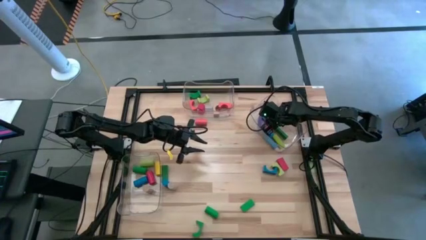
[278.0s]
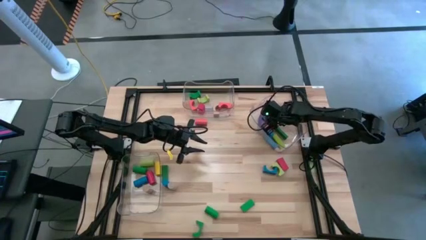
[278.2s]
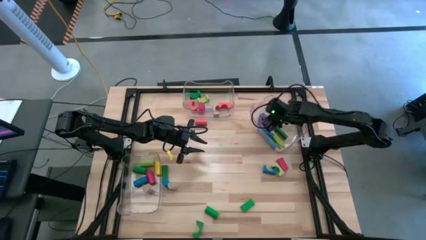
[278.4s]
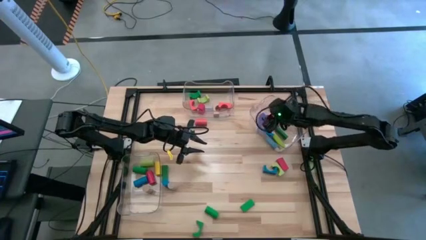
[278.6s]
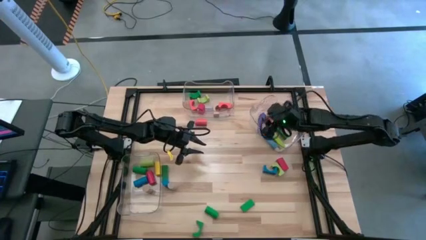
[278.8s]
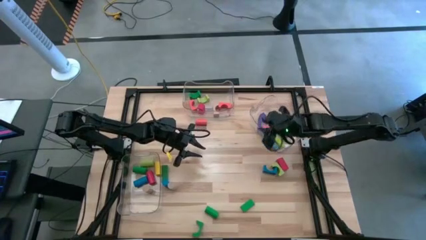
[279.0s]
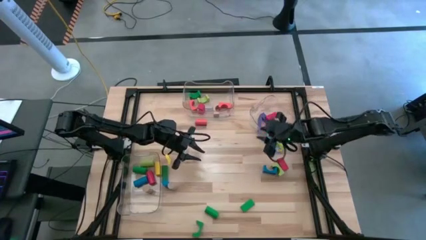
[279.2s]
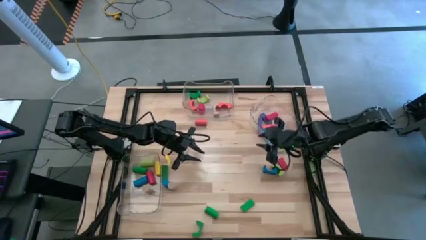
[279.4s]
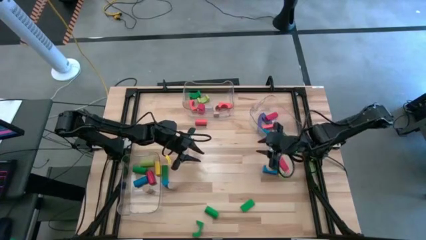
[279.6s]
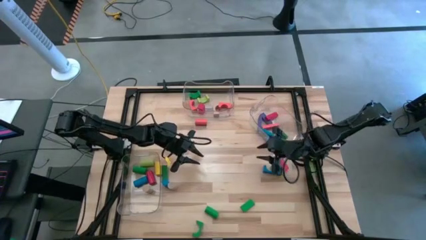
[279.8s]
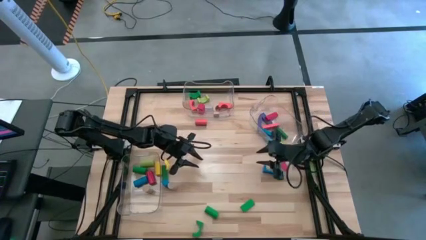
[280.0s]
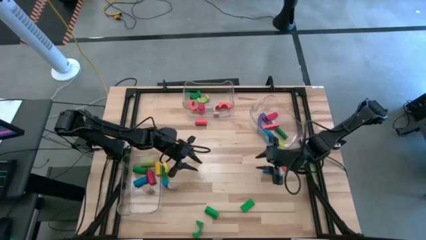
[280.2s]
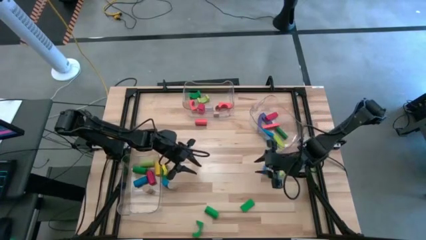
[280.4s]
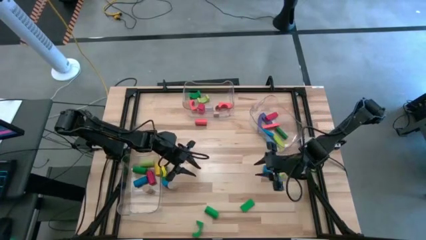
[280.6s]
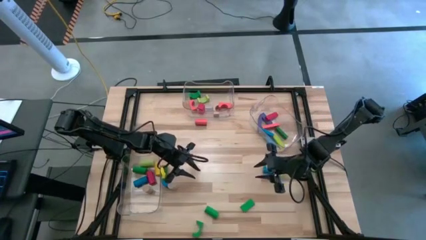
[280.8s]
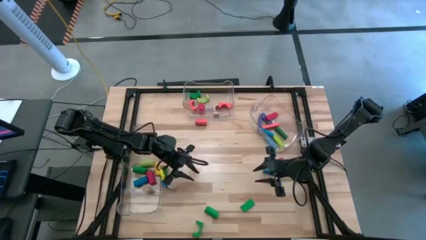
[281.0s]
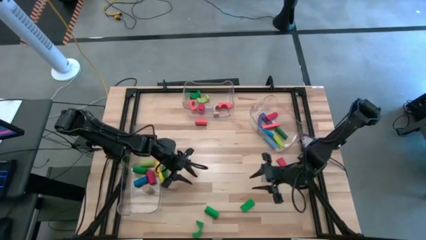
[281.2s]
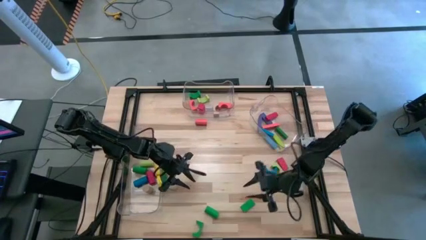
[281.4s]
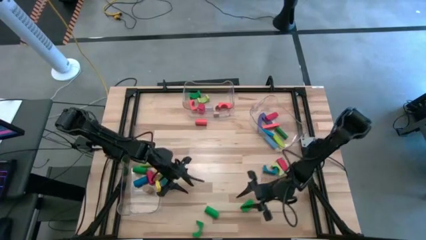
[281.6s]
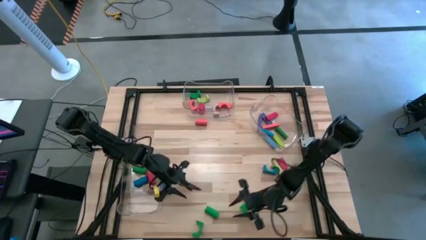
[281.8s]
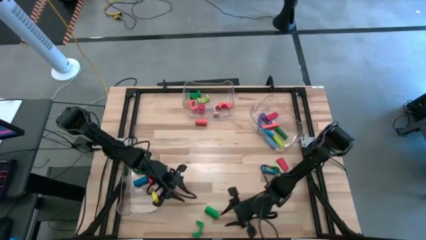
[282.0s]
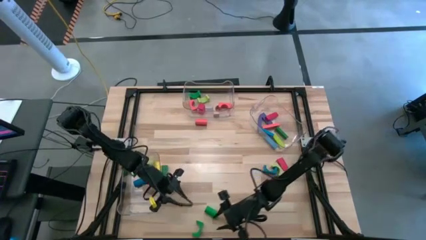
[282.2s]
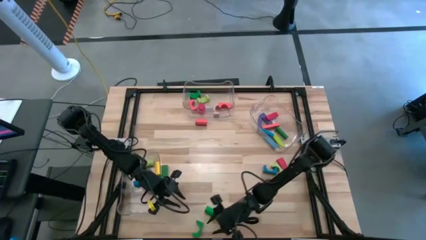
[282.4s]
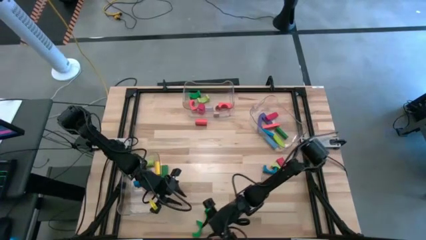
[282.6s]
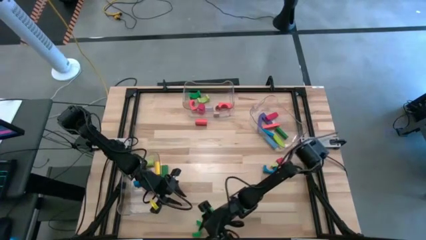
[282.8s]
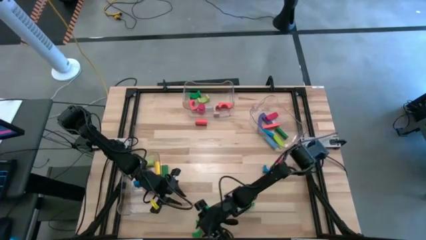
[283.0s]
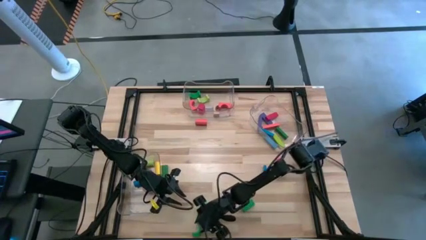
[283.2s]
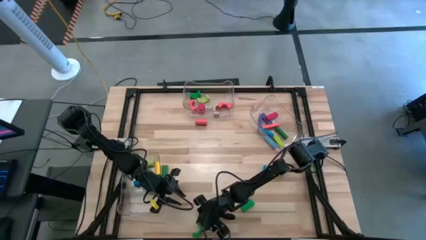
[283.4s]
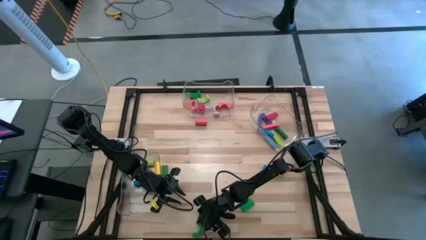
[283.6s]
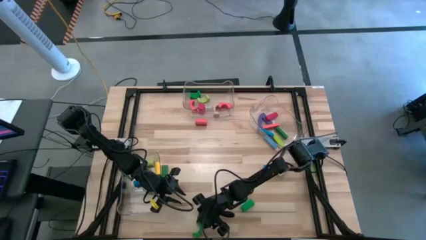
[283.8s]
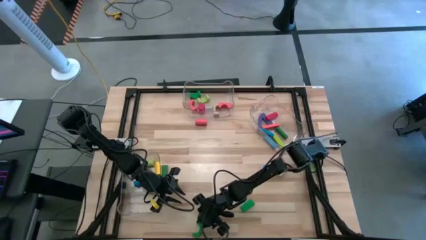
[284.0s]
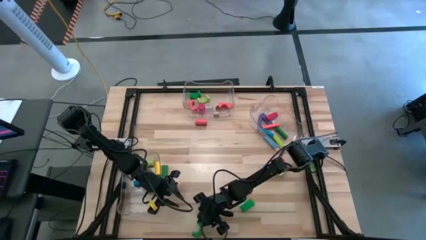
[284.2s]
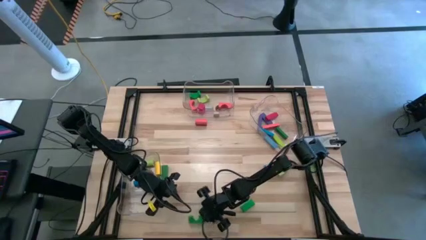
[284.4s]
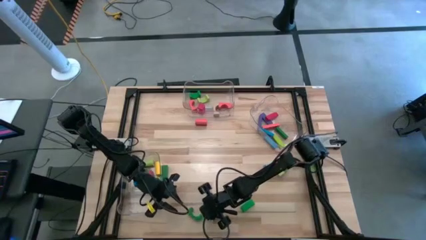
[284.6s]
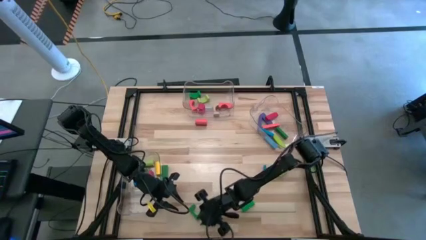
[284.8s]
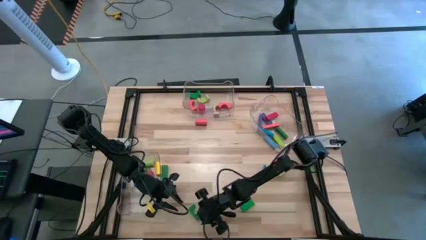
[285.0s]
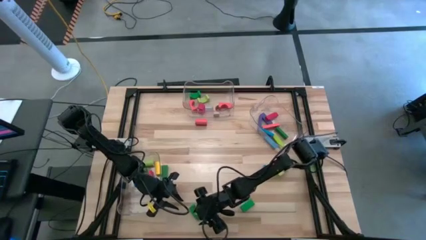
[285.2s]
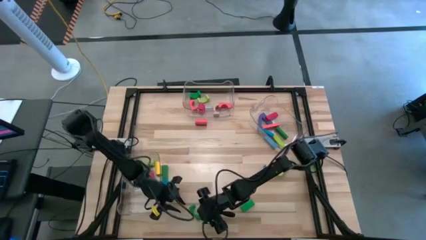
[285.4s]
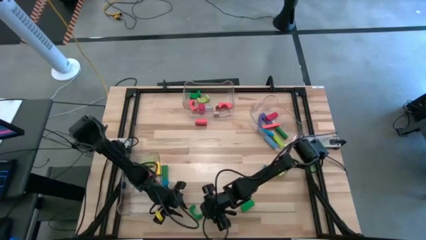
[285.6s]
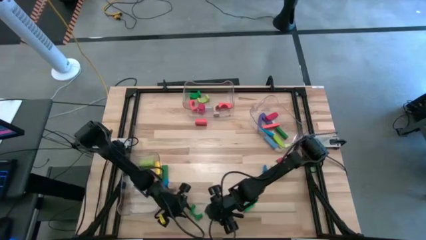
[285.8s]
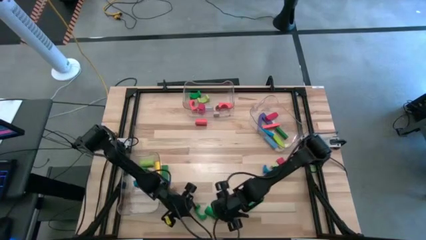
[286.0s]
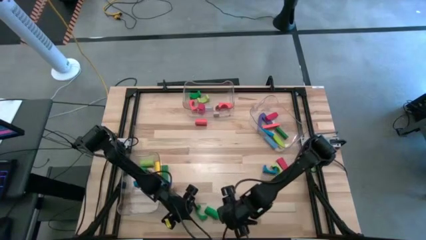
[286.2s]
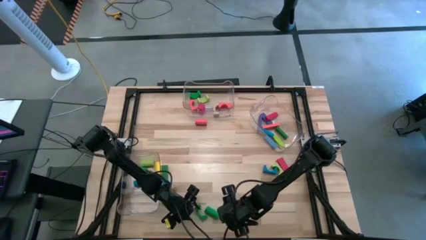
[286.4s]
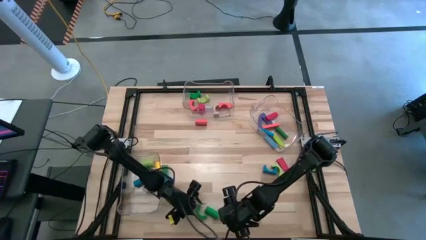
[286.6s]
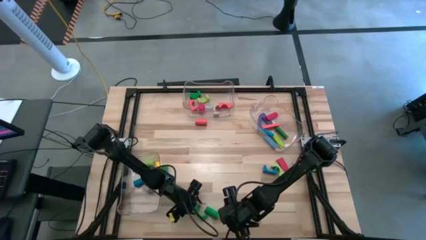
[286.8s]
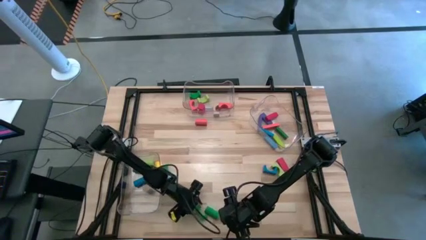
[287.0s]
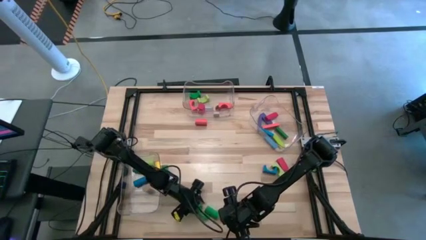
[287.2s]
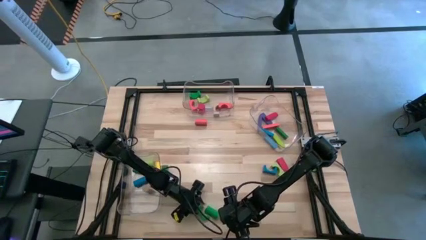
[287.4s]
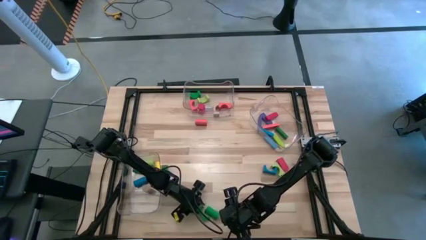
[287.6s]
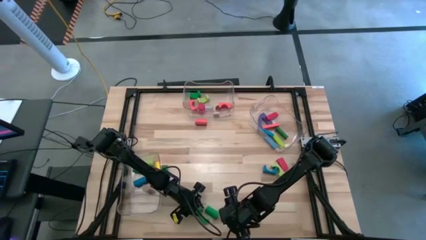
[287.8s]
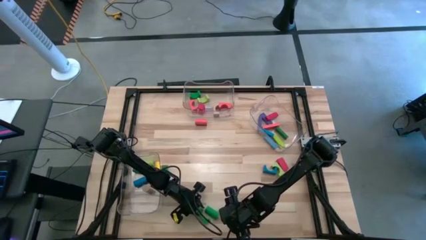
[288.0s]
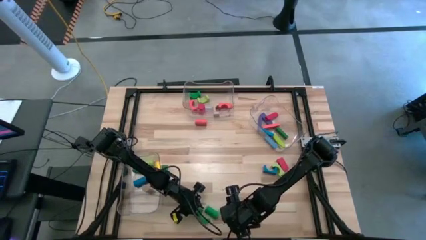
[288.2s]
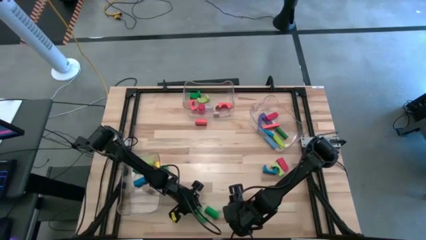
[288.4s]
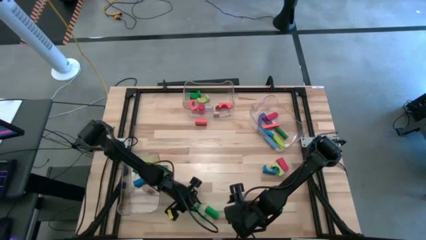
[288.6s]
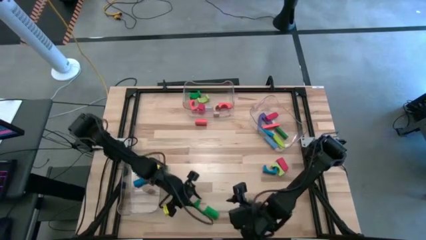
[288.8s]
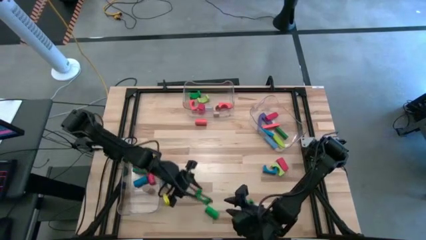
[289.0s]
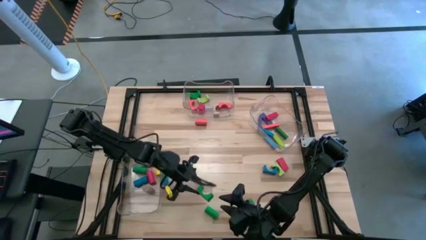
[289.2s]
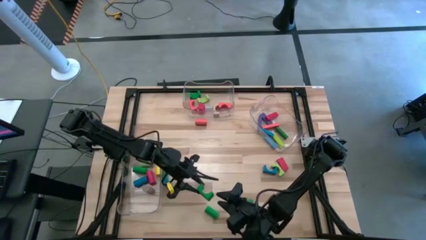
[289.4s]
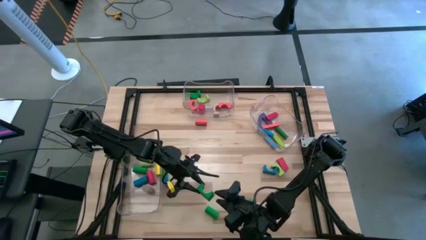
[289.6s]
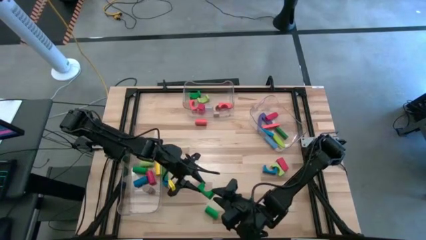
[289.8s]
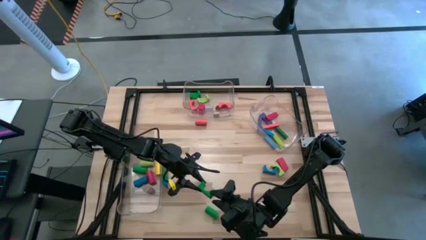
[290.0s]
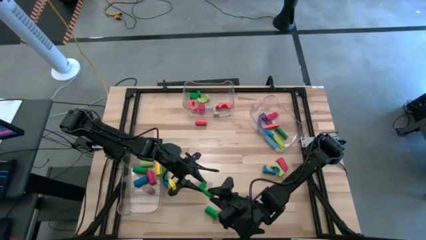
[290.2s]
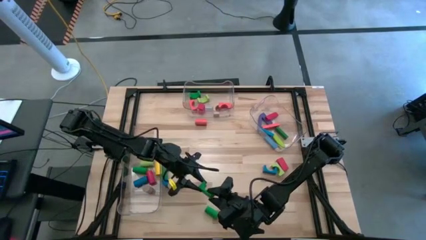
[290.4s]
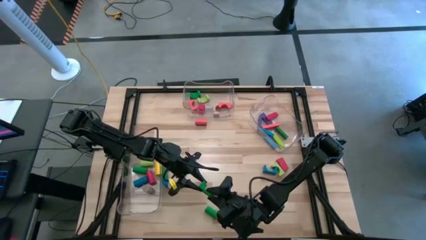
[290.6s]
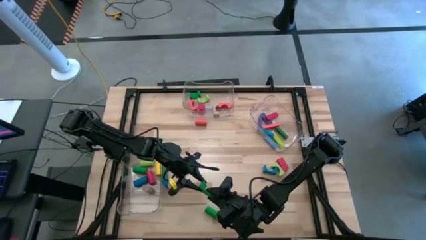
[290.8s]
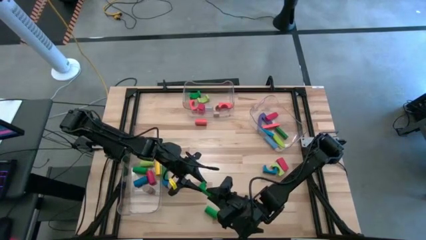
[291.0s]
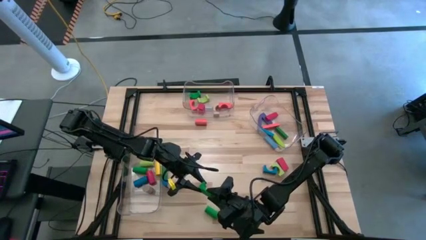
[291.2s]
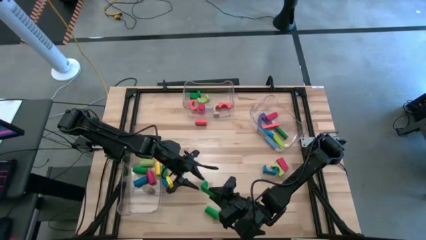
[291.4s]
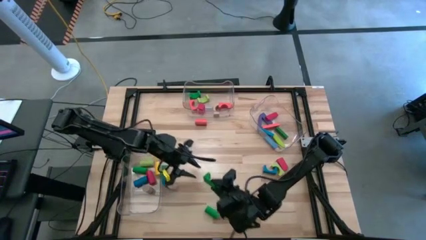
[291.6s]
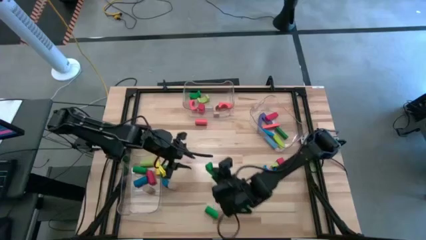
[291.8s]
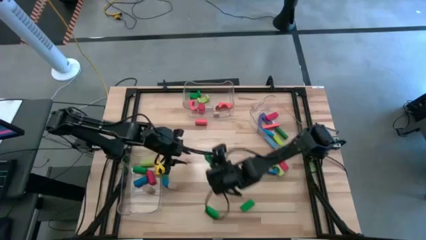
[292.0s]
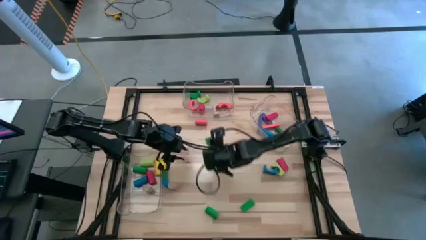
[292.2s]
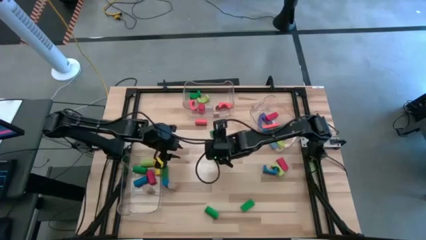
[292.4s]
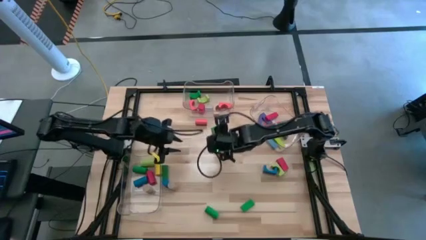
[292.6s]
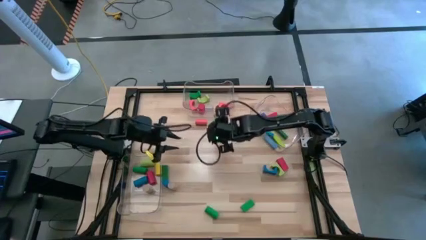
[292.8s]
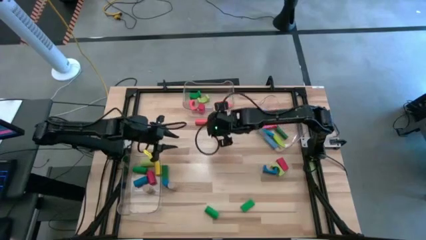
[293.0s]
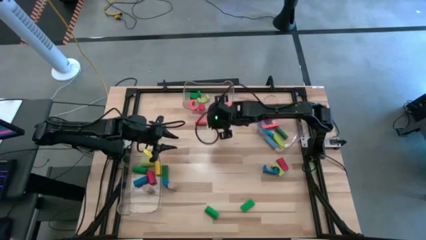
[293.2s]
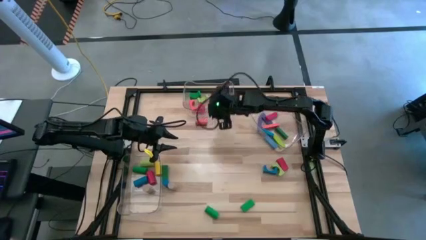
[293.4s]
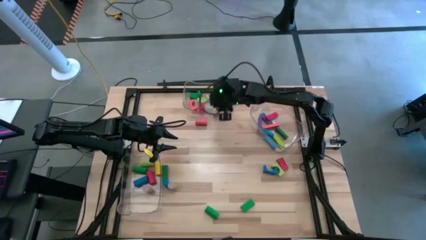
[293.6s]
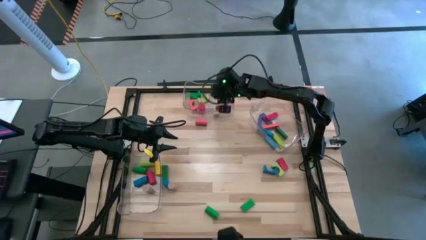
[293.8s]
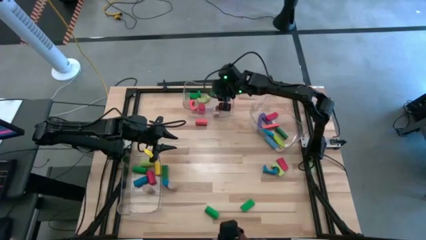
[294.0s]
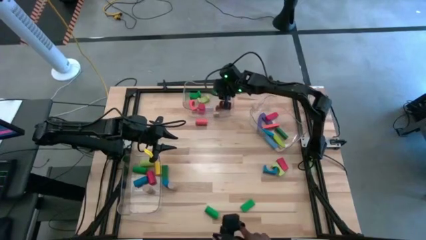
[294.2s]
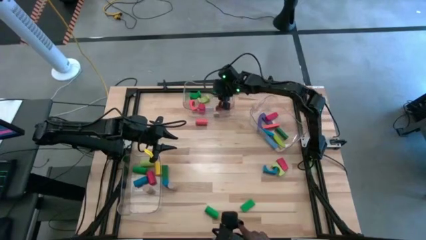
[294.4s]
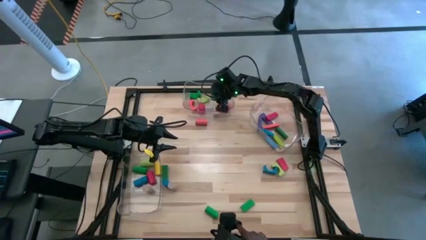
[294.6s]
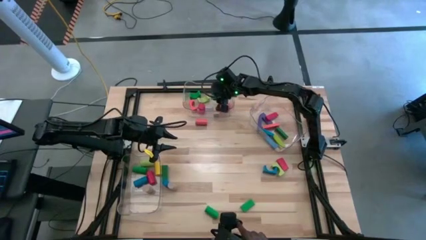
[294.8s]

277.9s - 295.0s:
Task: Sort blocks by size
Put the green arch block into the middle transparent bin
